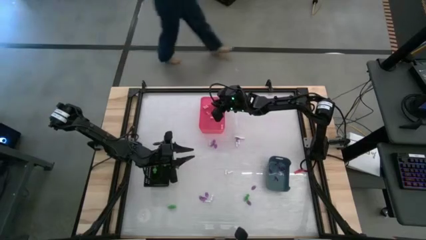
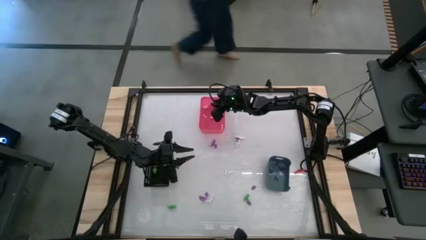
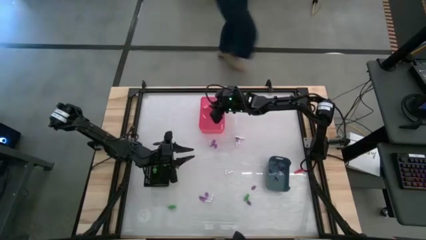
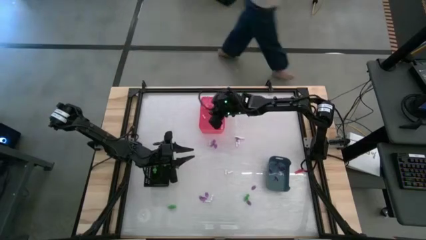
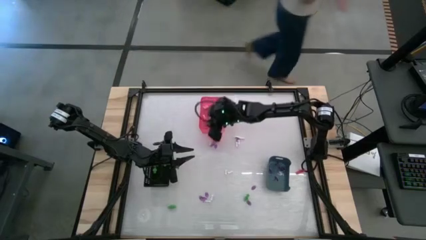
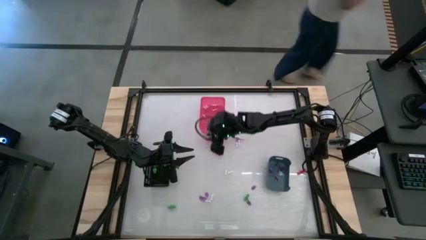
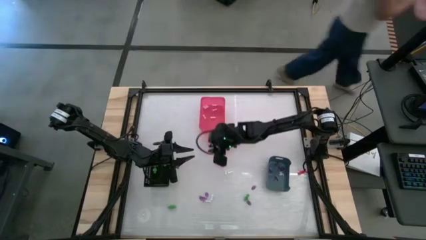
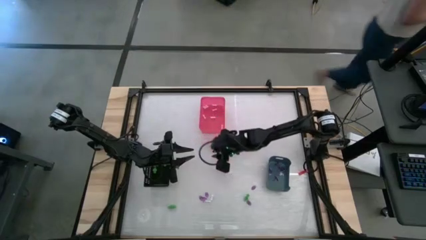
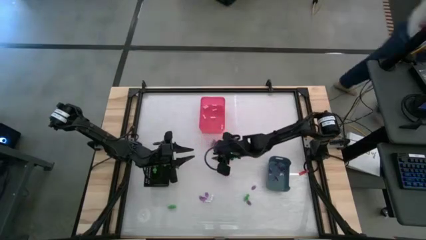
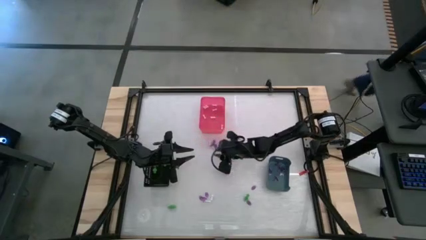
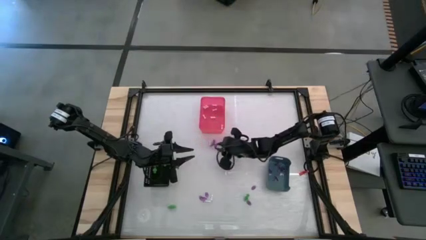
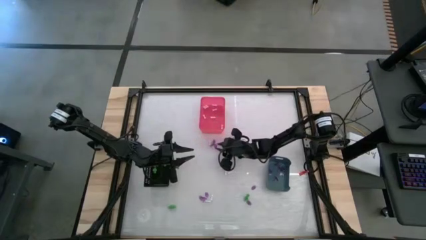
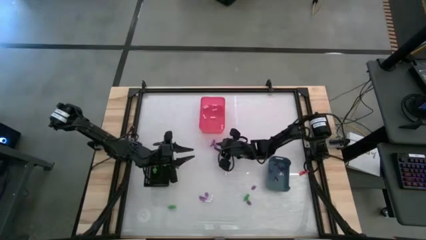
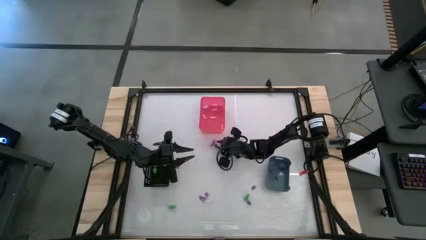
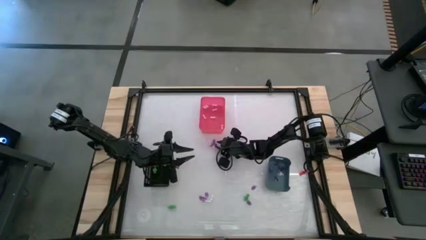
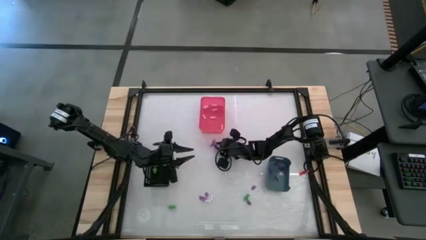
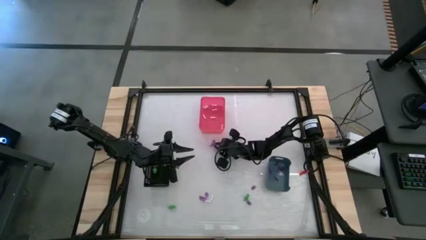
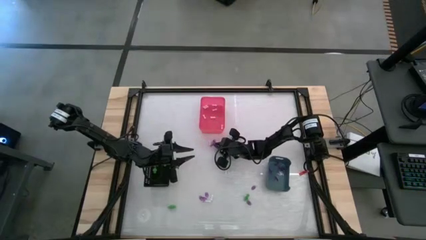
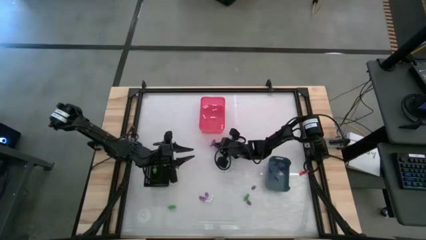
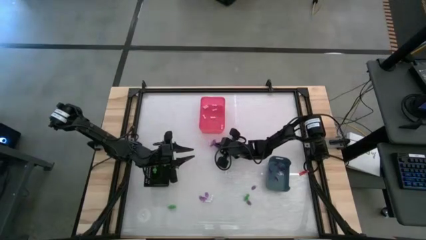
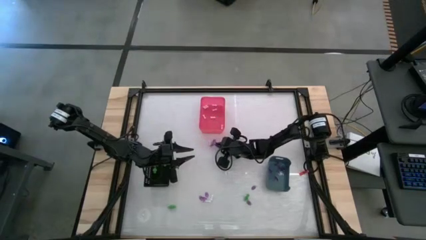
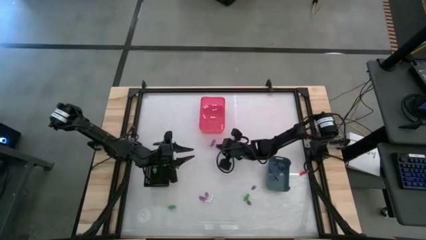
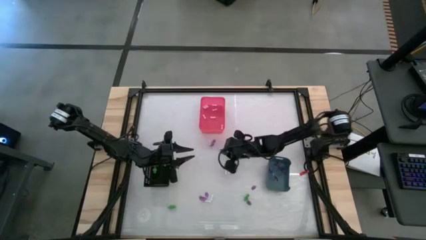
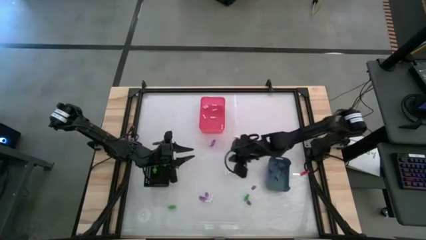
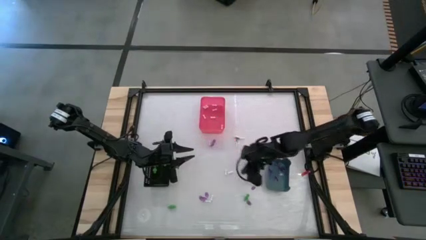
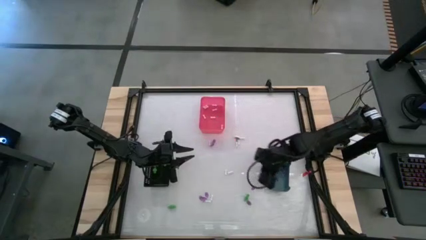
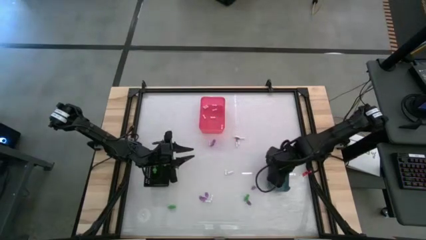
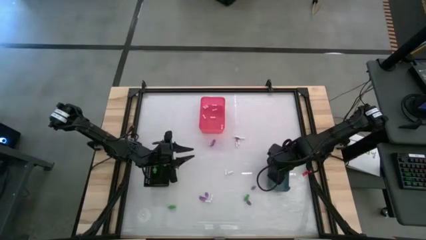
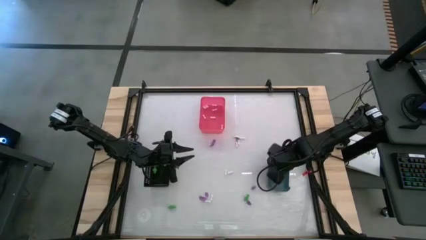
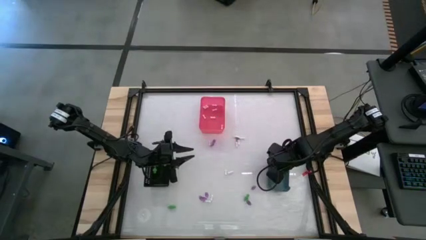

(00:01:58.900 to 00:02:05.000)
Task: Sort Halloween decoration
Put the witch hat toy into the blue bin

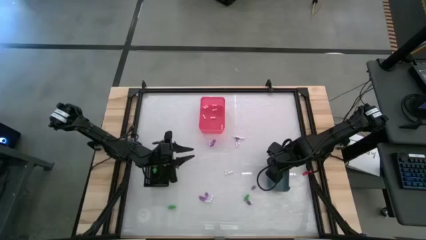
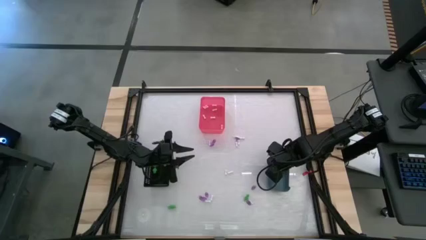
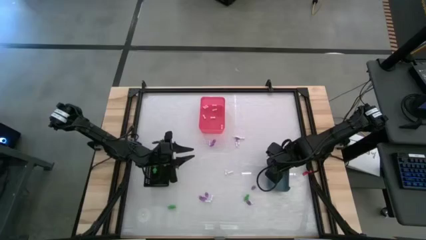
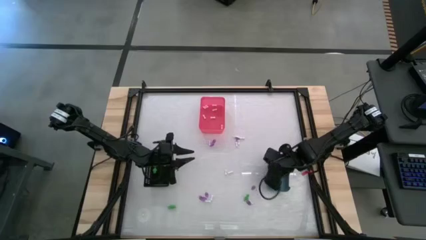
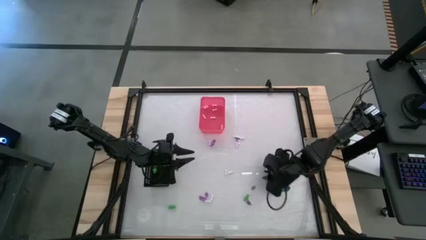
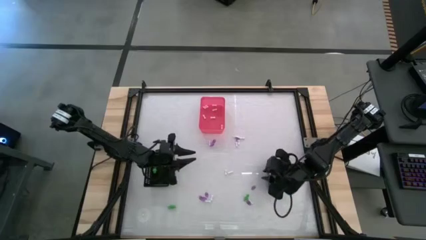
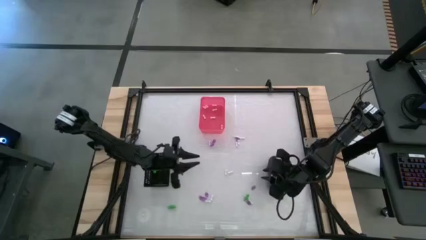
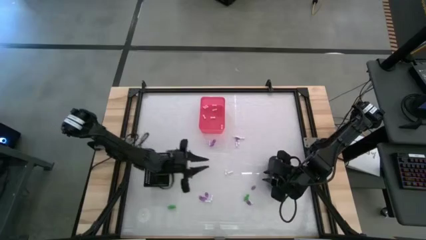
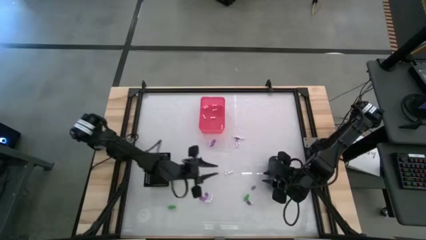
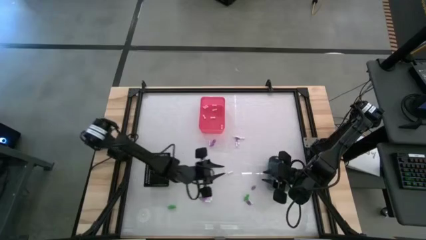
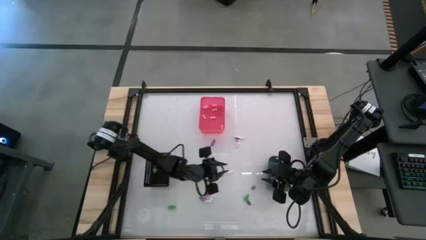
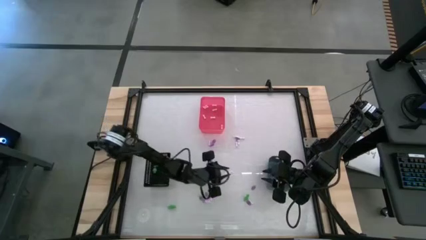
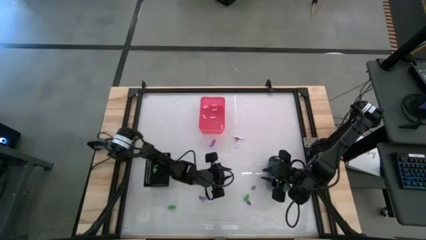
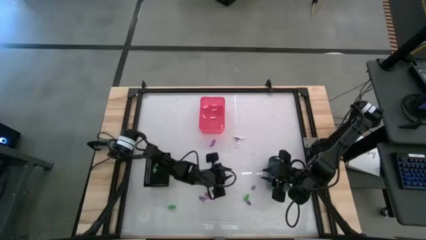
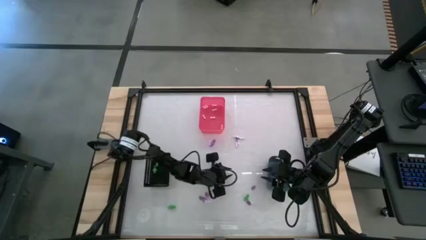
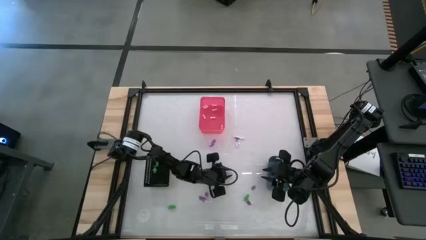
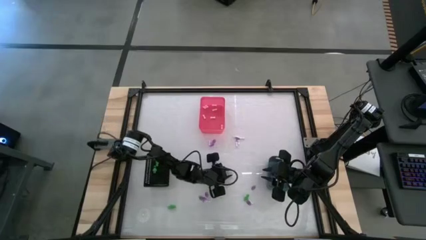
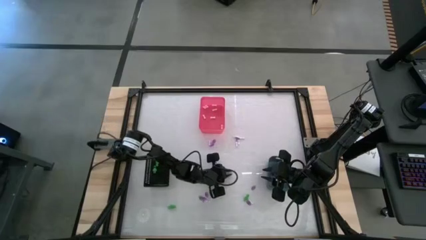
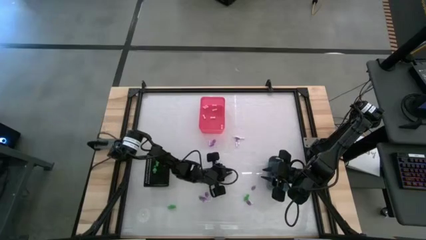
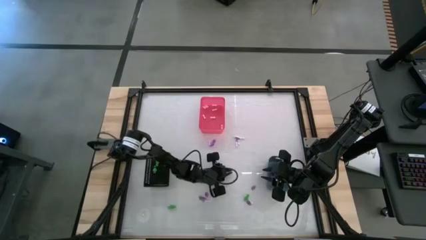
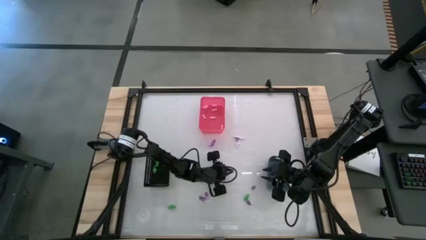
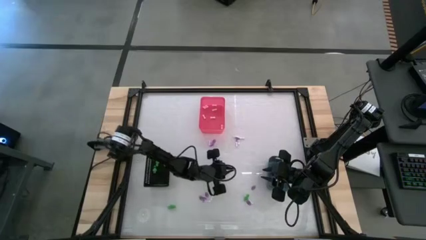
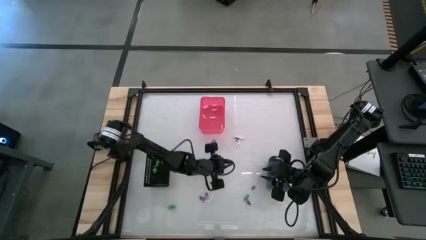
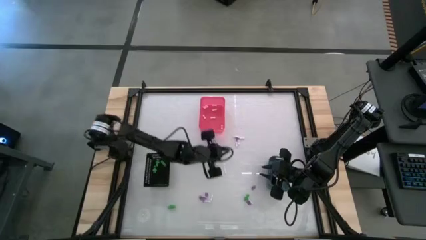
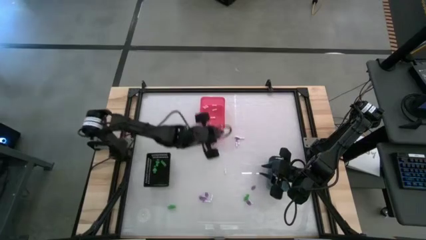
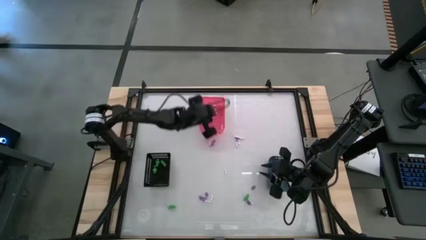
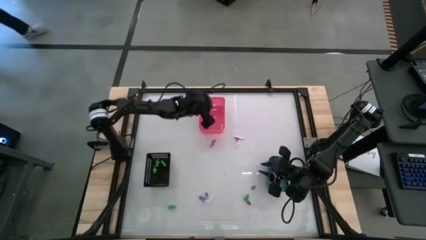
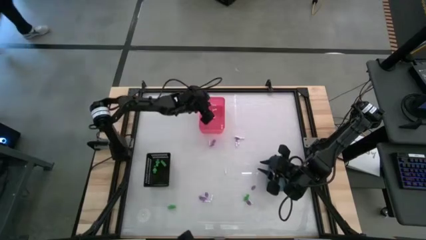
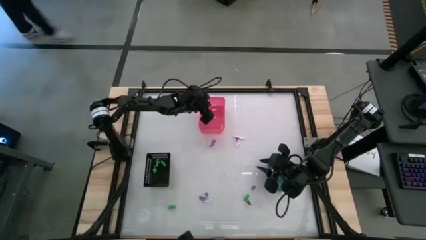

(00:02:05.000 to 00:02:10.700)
Put the bone toy into the red bin

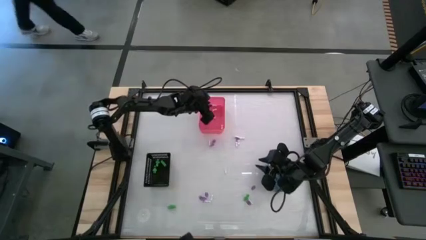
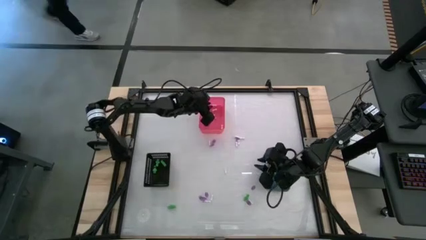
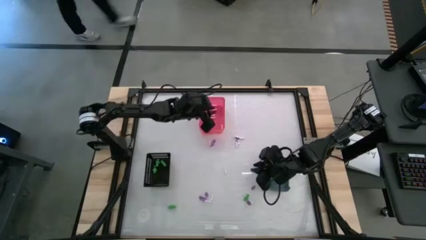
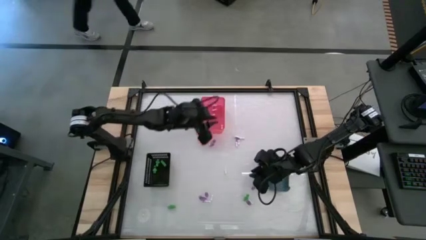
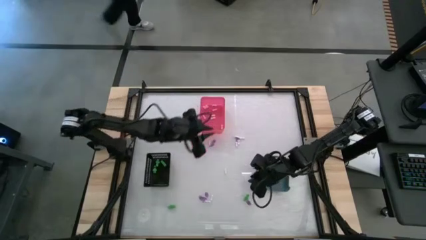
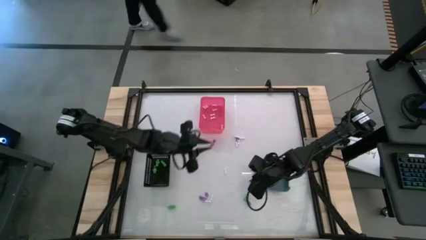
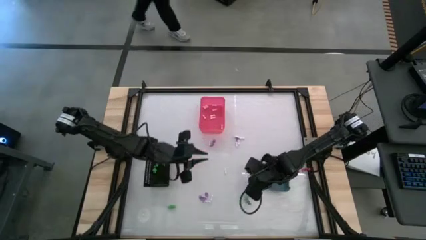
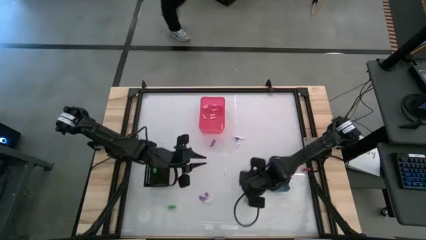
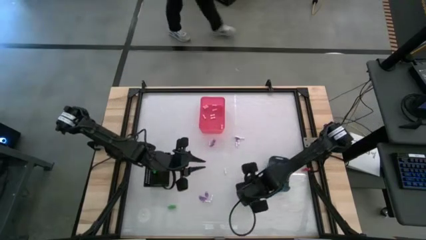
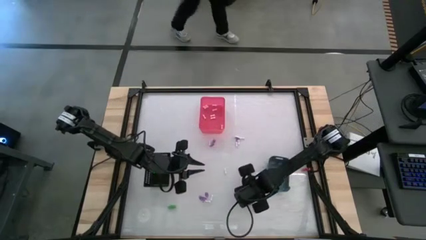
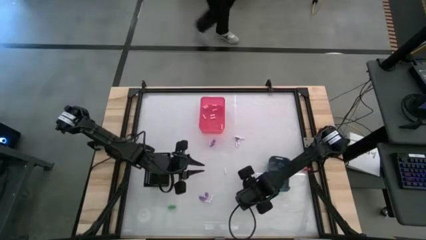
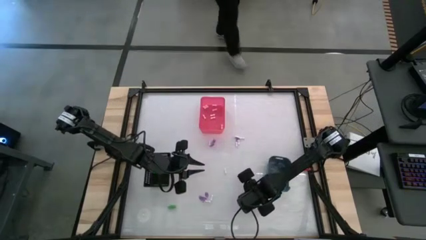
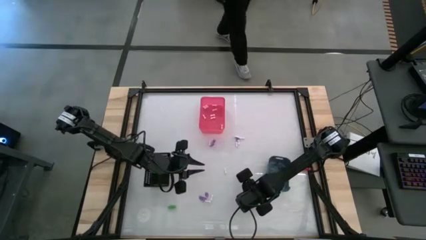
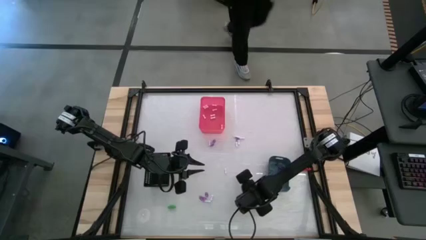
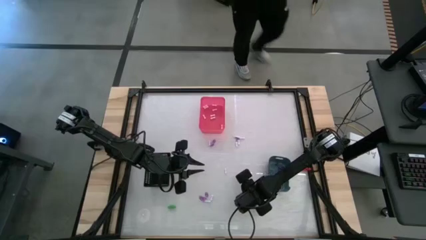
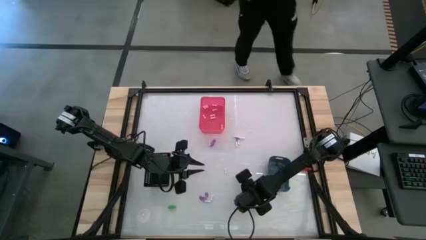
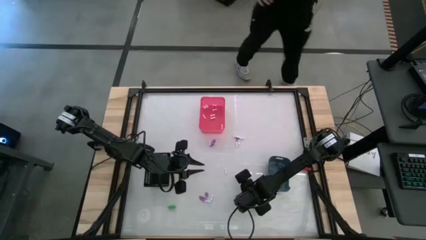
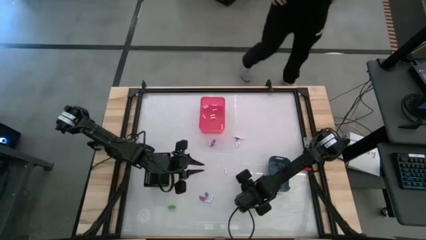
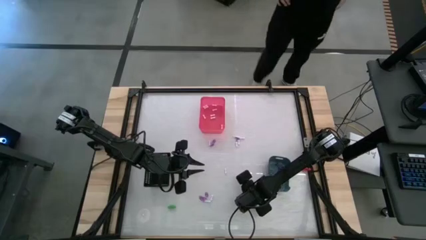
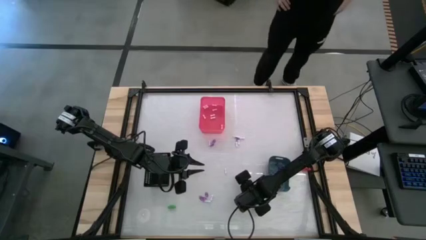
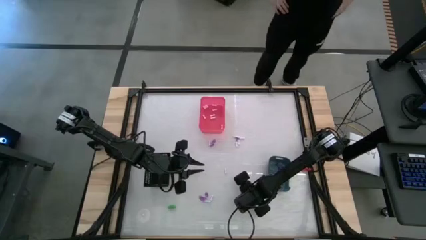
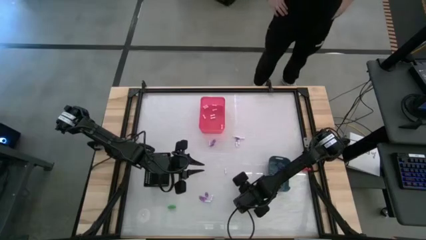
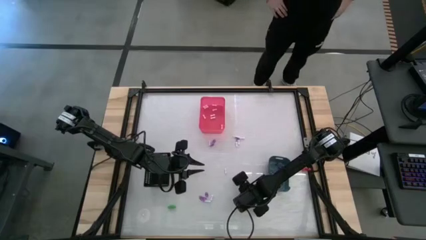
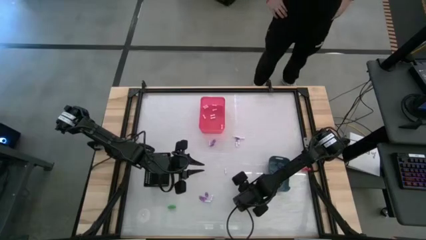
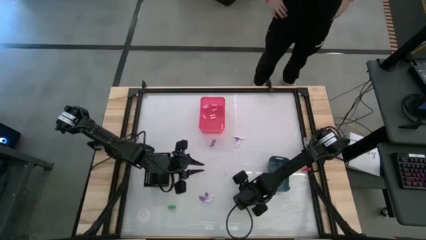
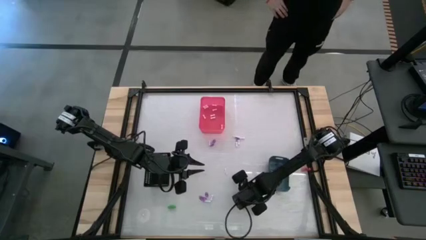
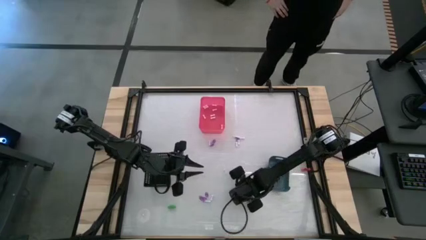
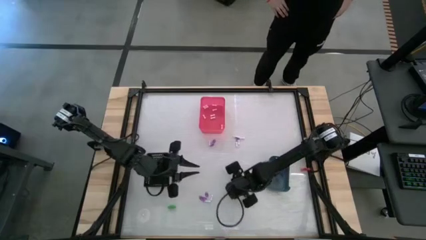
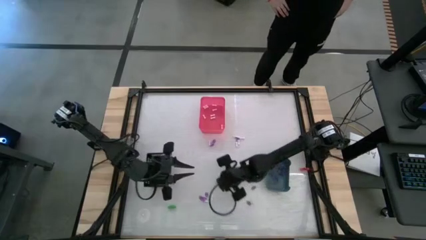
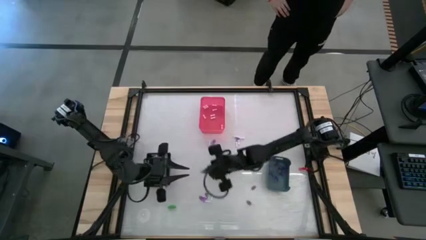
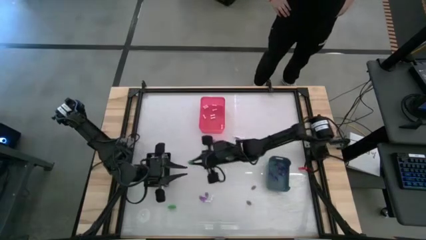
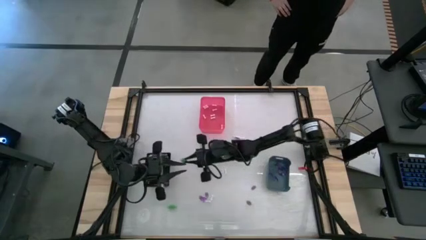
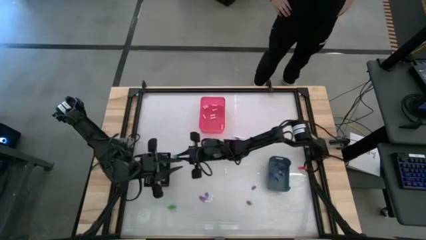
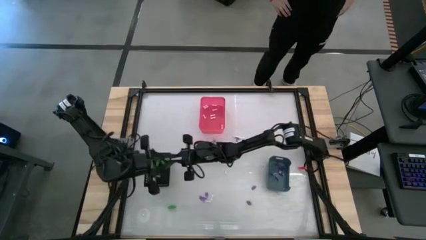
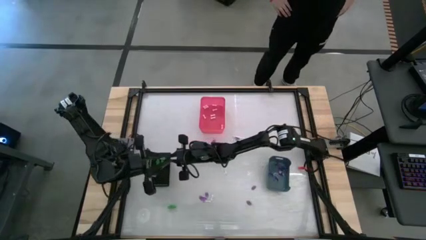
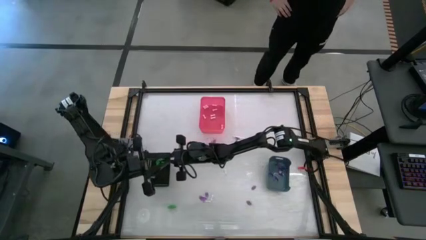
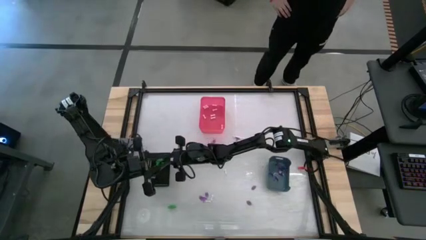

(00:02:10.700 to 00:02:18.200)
Put the skeleton toy into the black basket
